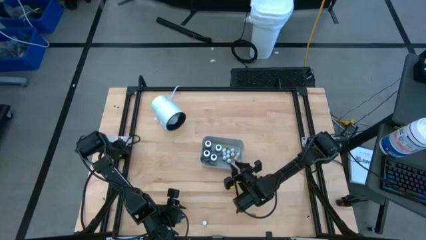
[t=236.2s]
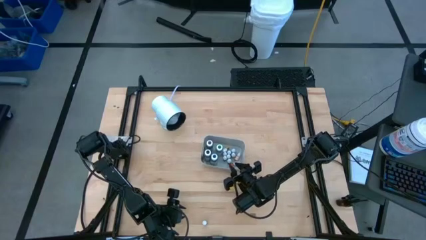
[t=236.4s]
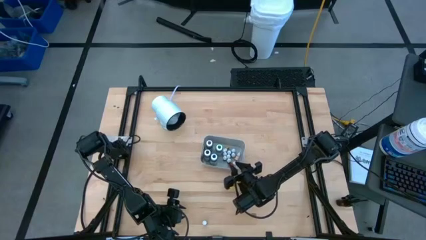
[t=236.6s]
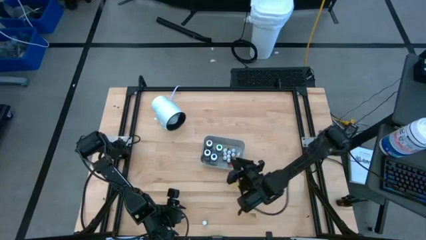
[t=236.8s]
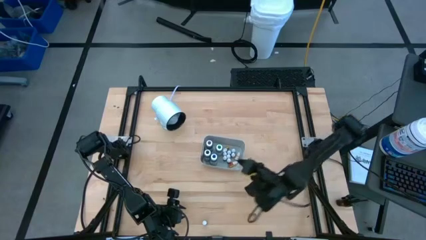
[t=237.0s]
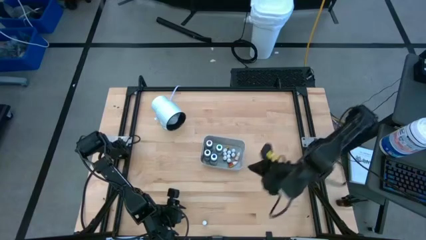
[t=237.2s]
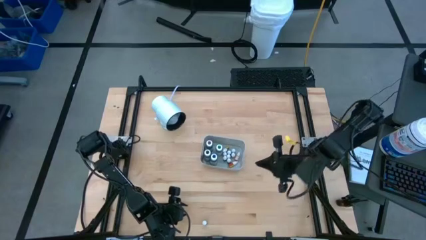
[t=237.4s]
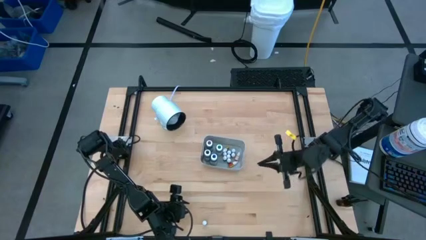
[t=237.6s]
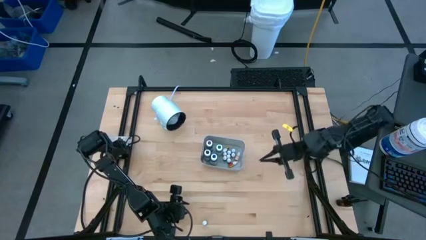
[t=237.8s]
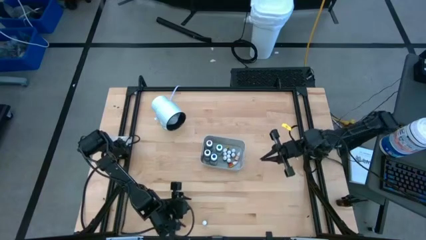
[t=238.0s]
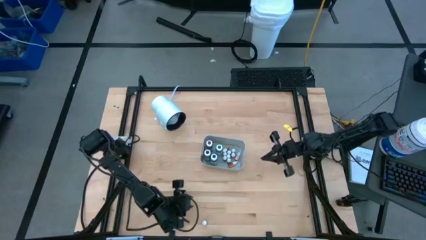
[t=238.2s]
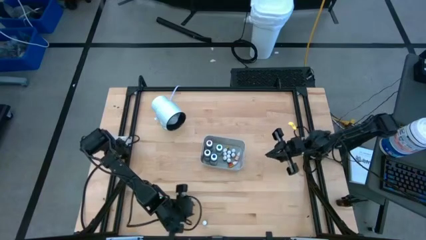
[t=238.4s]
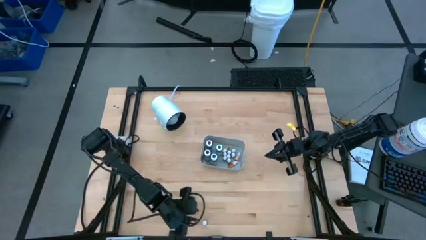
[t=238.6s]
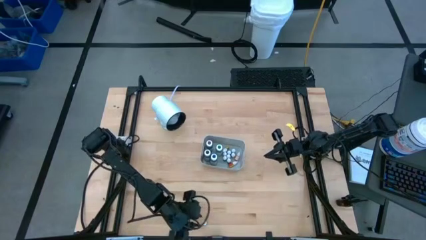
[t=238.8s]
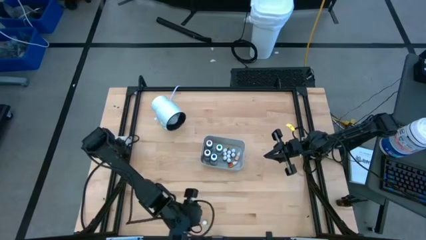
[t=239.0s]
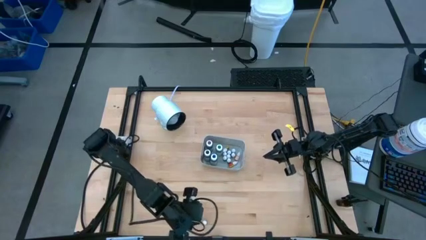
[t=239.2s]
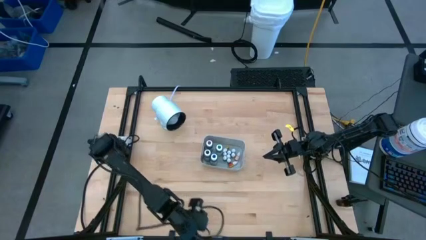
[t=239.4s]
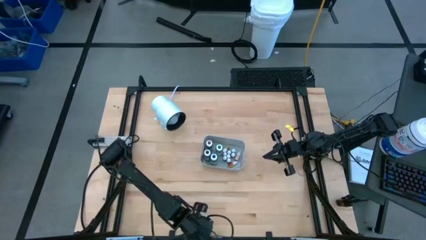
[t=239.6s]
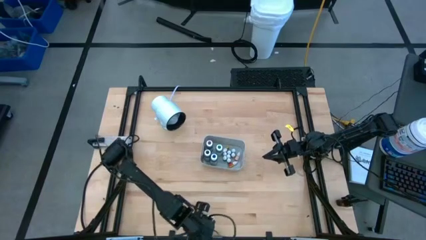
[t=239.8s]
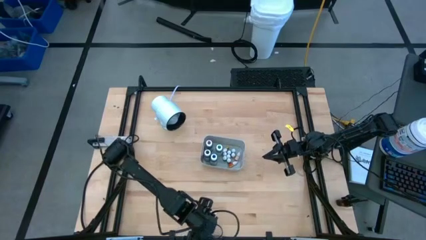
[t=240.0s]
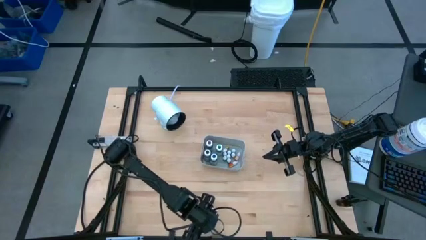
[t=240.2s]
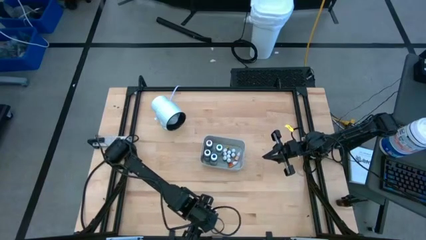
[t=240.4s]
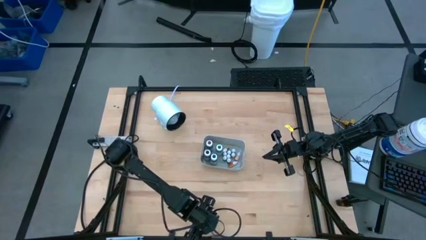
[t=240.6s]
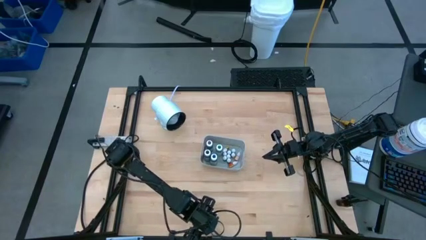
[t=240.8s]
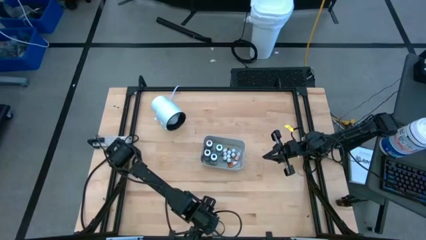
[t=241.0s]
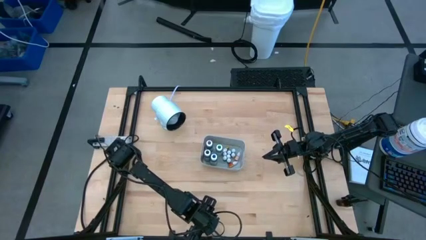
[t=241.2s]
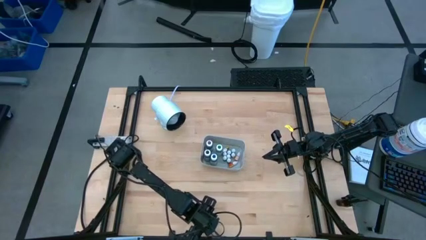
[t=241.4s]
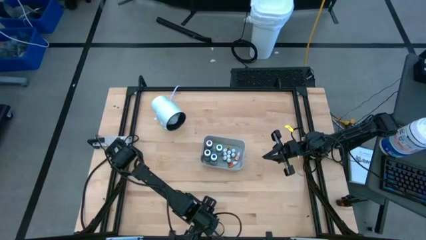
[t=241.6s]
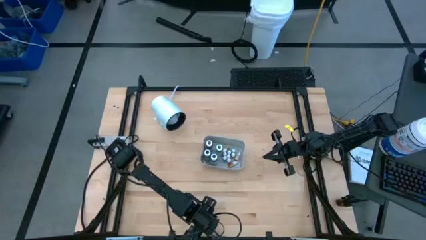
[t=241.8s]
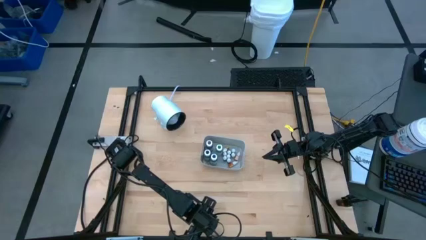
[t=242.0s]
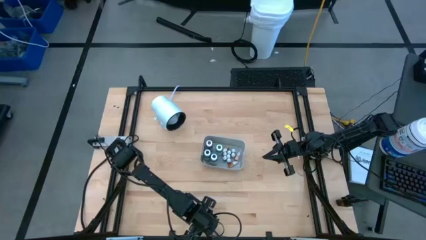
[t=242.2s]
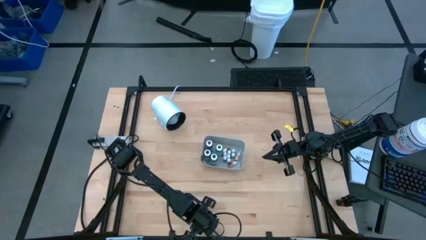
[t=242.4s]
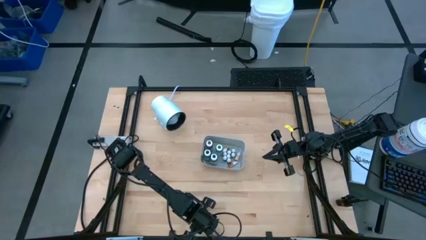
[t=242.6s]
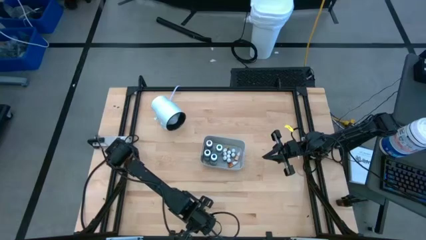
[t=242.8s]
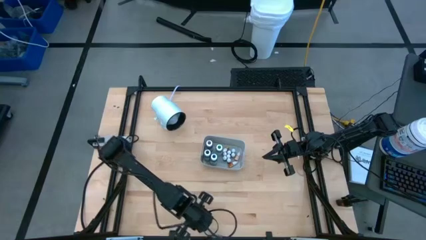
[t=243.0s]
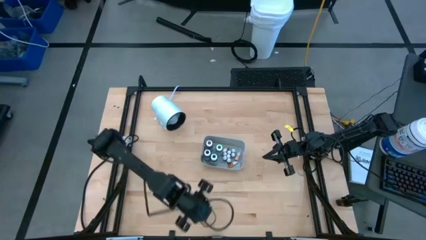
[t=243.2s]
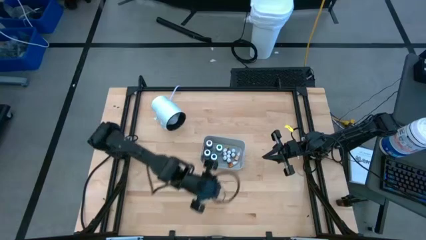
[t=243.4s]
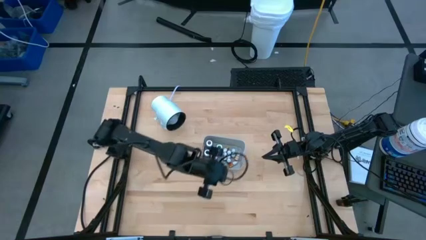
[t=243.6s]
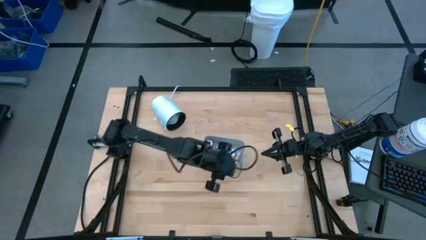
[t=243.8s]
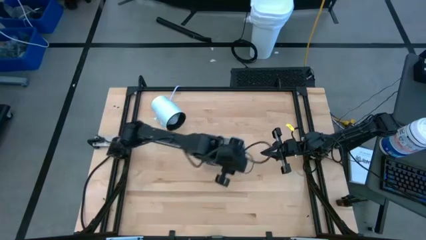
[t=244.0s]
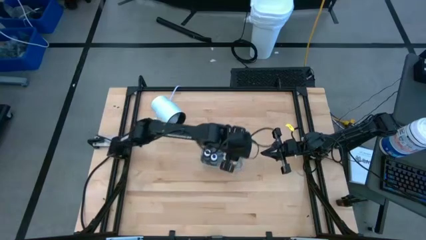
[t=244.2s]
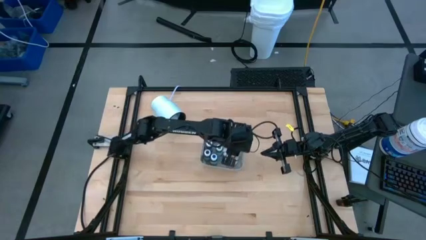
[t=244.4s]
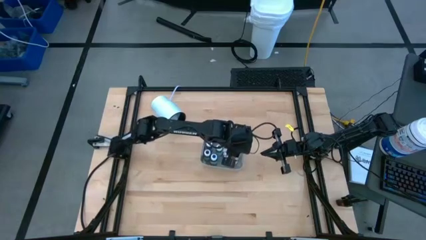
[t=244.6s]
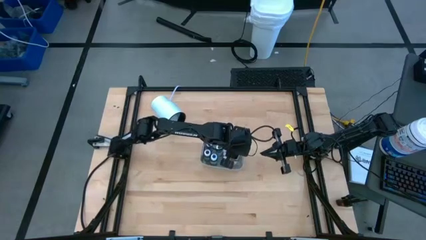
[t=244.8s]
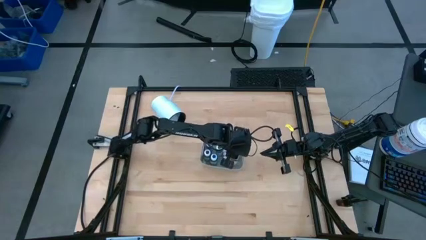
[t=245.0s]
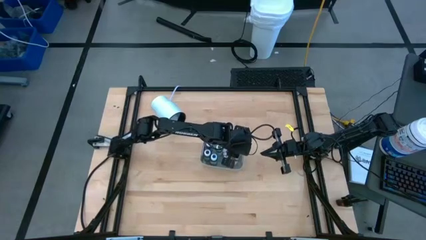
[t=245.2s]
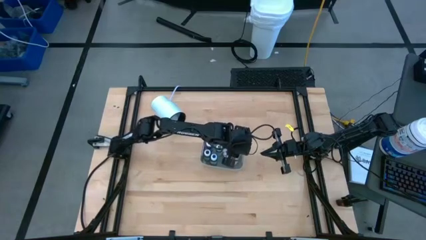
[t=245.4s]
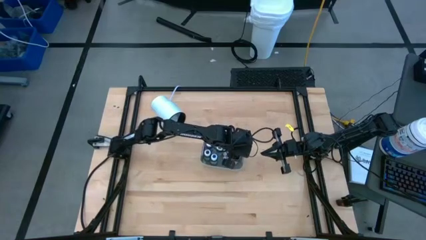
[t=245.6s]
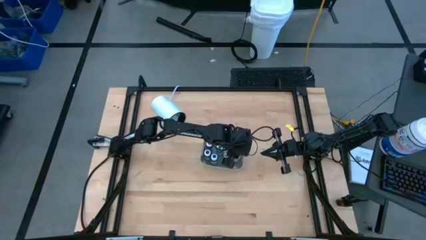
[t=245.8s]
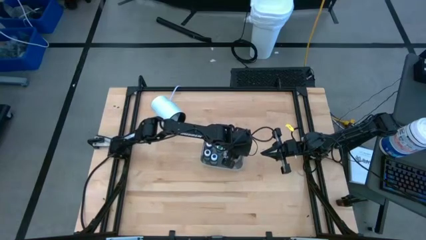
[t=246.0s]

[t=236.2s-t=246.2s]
Task: Pick & Place food coloring
Put the small black food coloring bottle into the gray bin

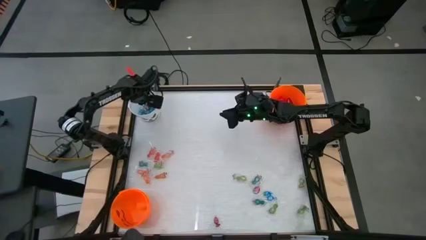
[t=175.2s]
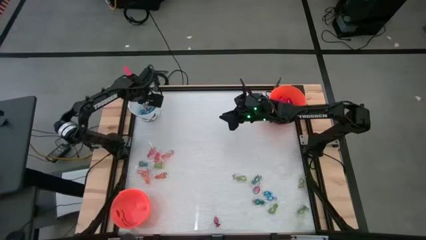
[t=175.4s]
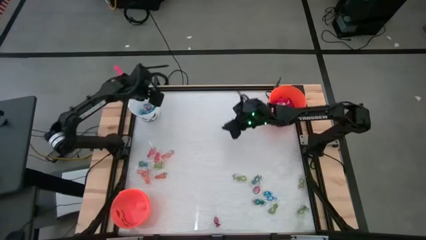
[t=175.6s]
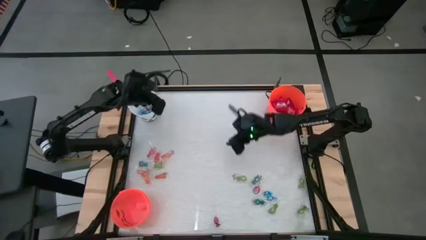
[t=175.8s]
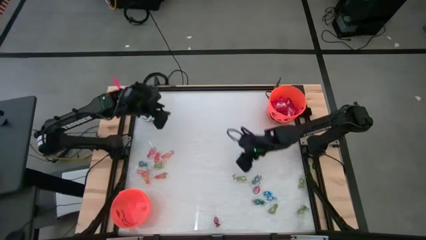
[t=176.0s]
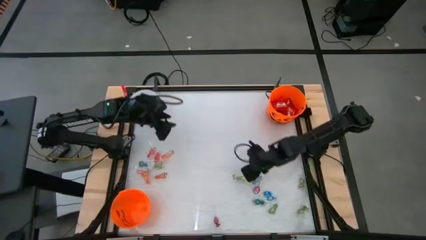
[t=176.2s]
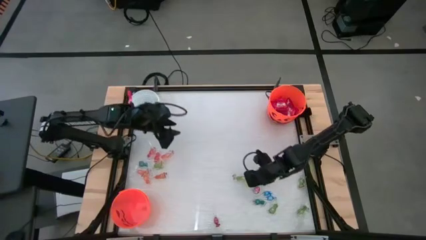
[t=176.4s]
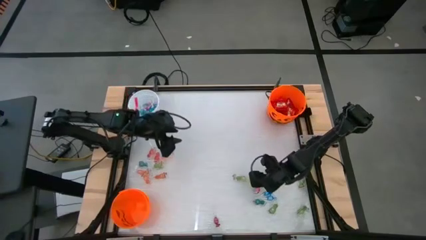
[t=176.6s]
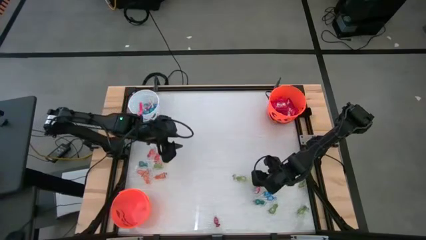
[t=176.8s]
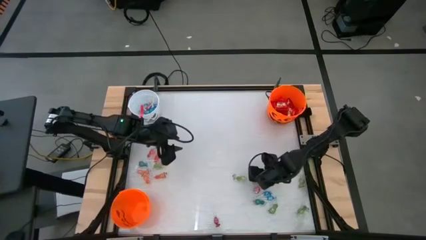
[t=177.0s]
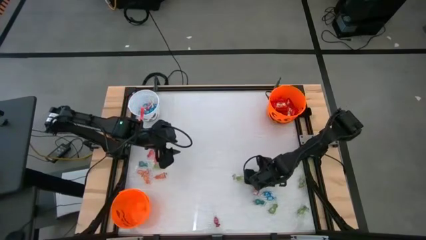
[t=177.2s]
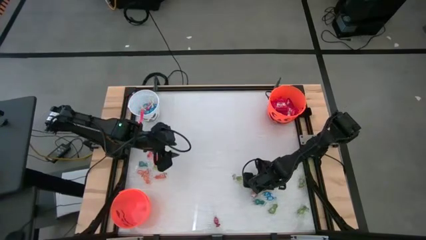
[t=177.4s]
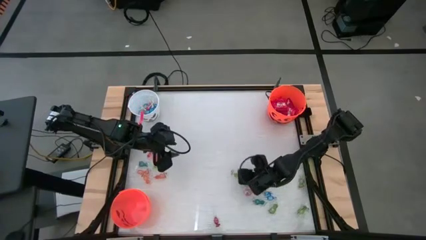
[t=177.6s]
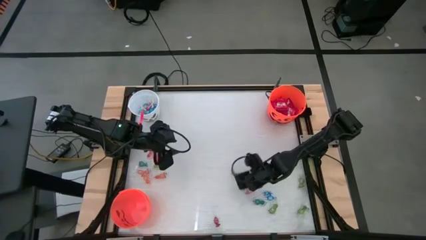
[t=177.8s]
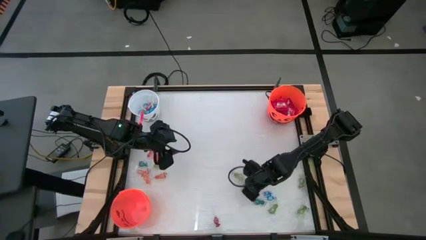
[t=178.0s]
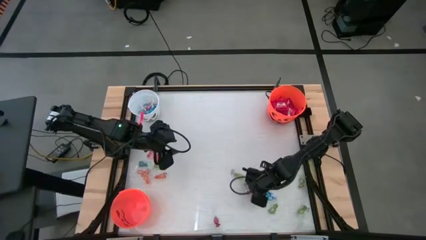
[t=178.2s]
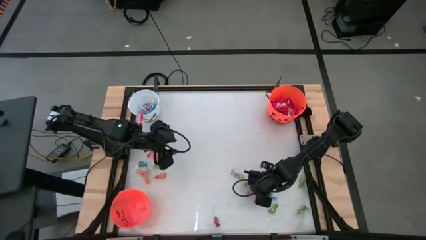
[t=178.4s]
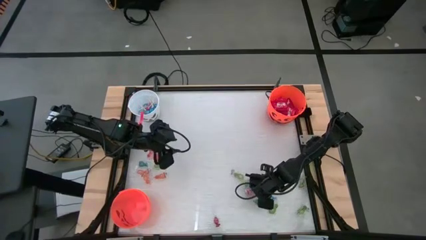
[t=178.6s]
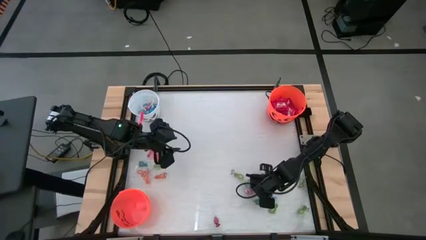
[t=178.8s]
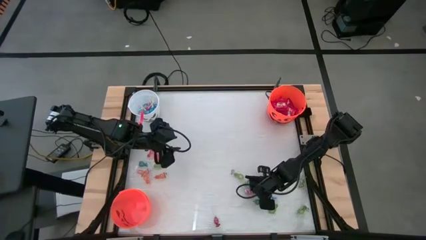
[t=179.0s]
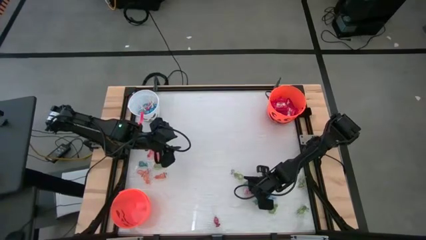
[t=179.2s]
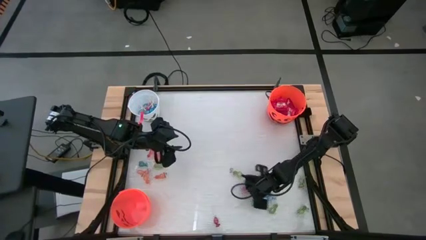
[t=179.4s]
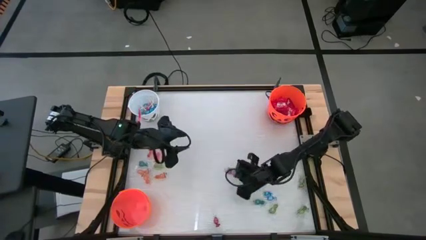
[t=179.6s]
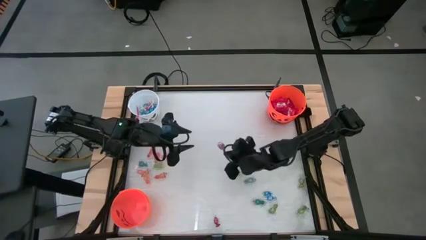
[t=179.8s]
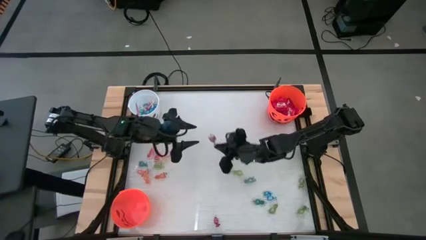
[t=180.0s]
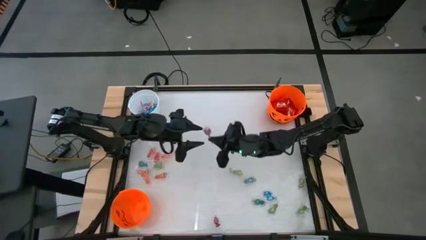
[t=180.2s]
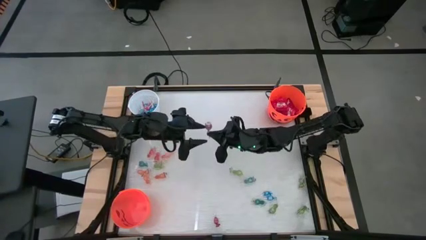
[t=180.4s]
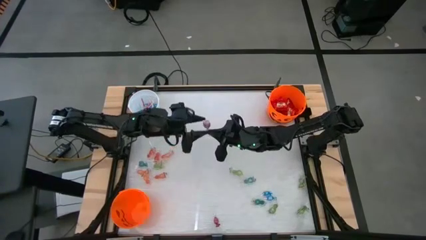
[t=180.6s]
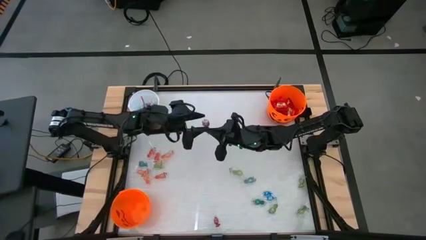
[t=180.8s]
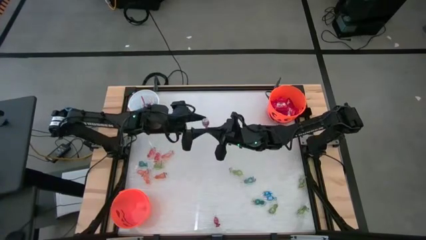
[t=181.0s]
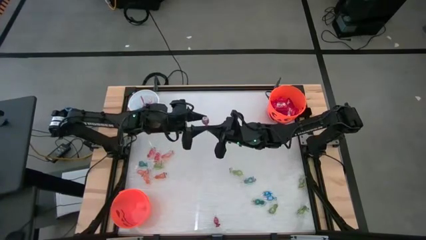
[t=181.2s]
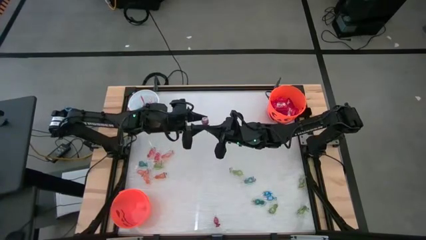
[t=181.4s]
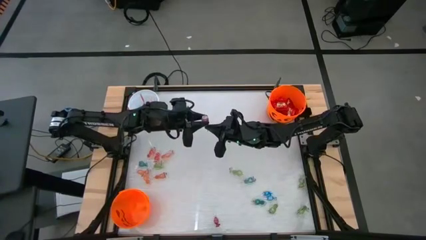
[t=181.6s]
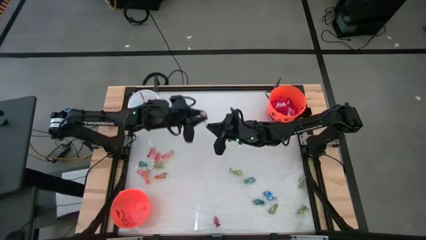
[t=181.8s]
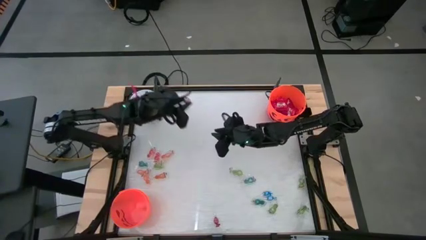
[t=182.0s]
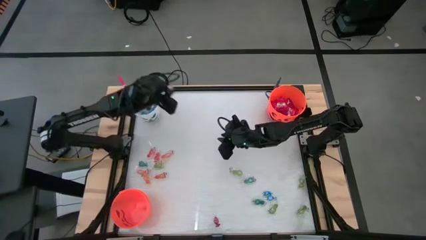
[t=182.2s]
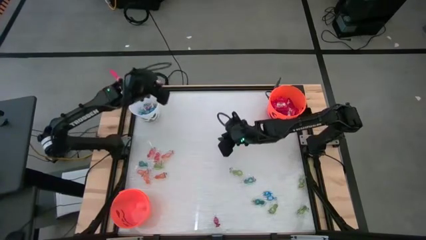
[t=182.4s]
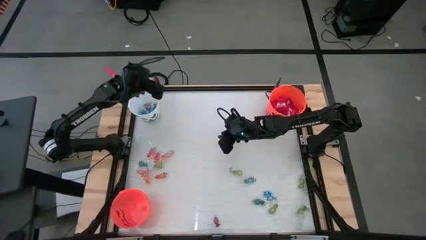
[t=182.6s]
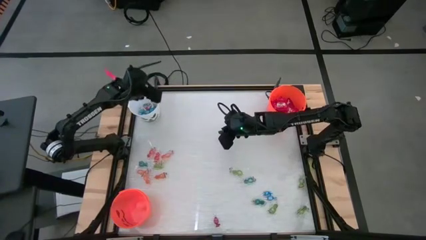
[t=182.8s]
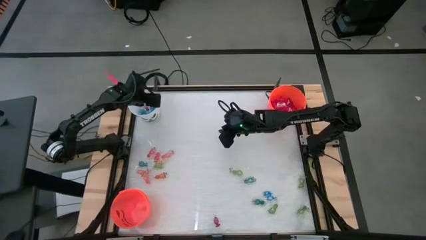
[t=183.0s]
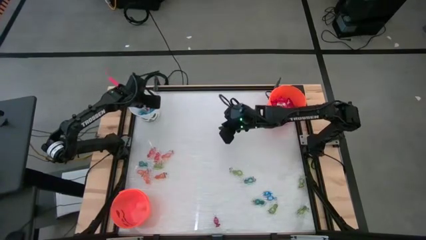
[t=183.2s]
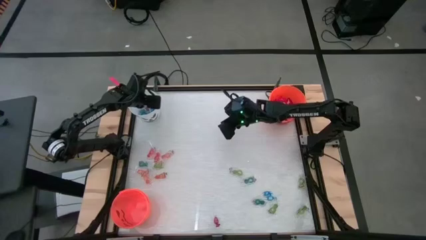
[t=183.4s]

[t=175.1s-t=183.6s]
Task: Sort candy by brand, put in halloween buckets
Put the red lollipop into the white bucket
